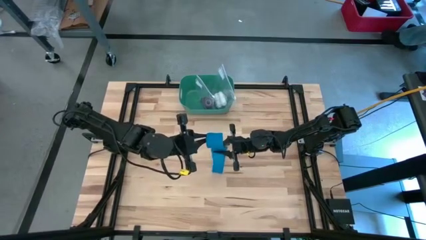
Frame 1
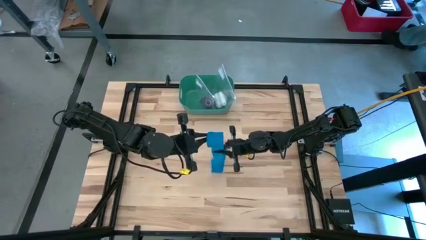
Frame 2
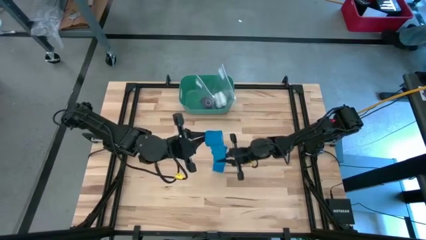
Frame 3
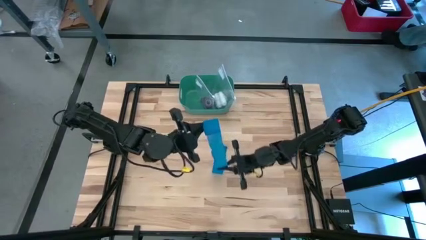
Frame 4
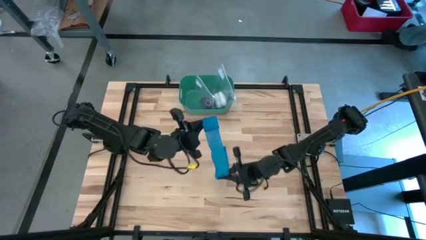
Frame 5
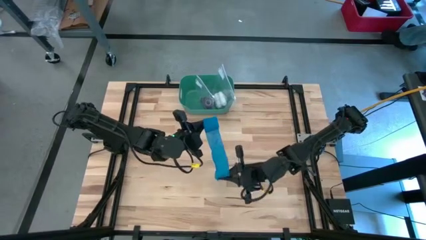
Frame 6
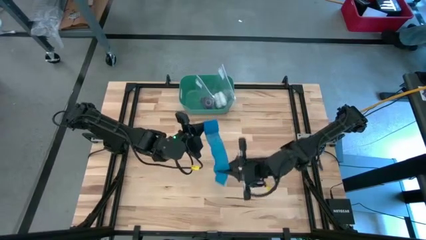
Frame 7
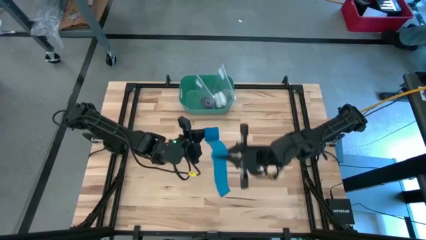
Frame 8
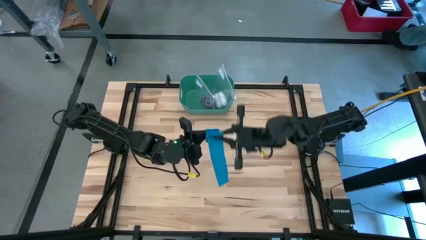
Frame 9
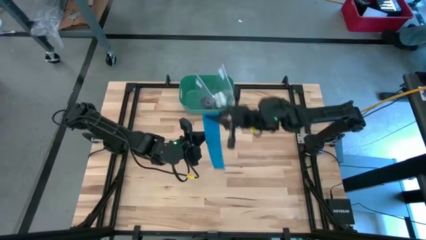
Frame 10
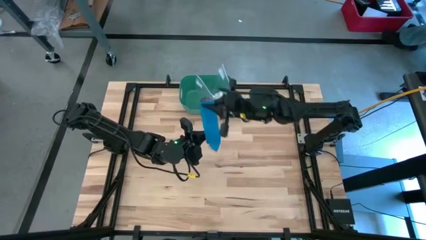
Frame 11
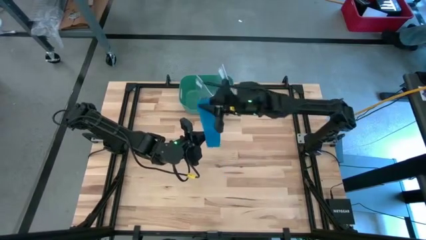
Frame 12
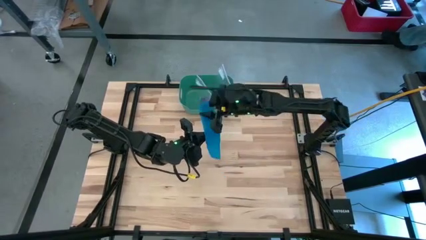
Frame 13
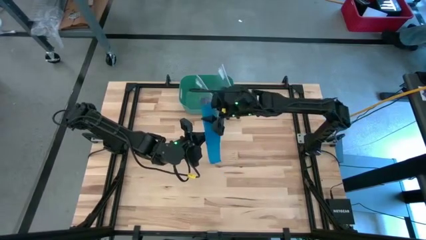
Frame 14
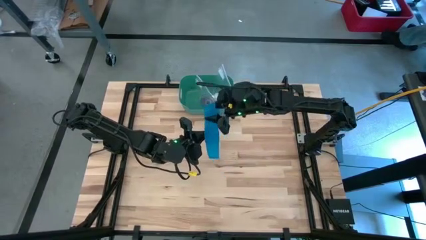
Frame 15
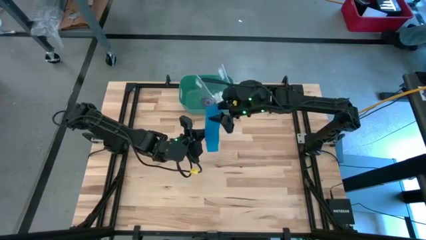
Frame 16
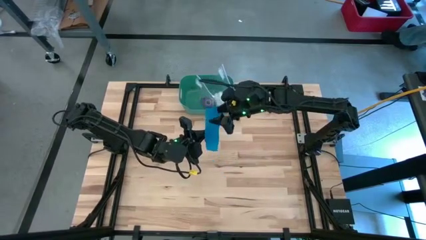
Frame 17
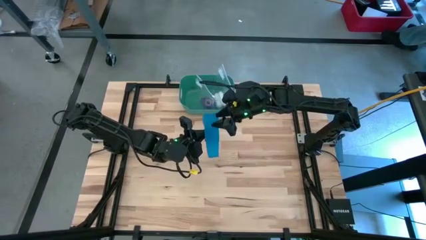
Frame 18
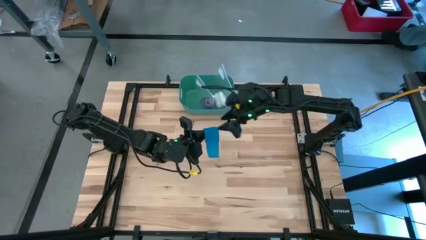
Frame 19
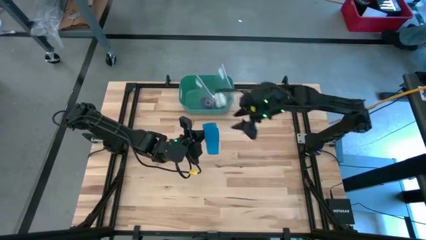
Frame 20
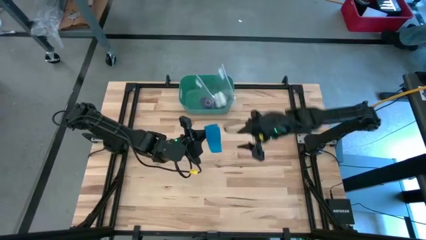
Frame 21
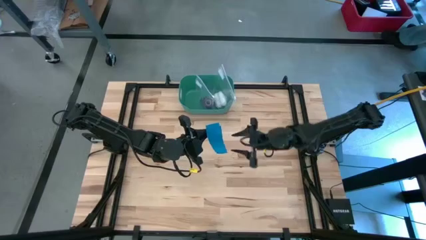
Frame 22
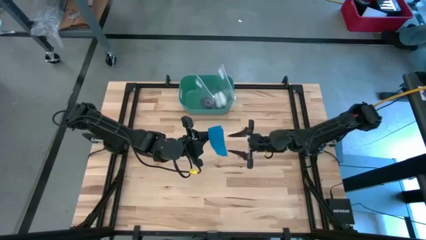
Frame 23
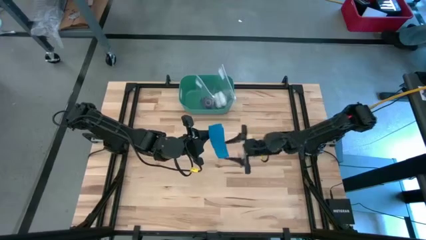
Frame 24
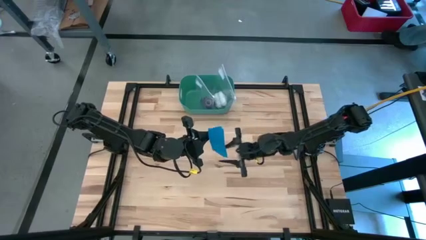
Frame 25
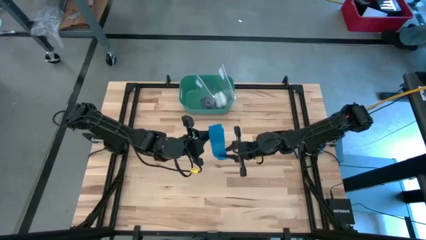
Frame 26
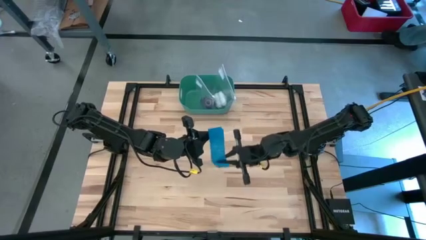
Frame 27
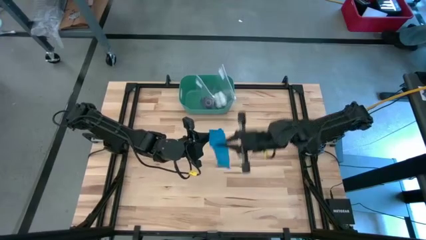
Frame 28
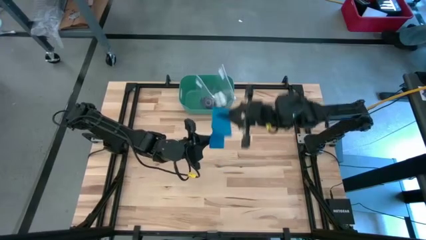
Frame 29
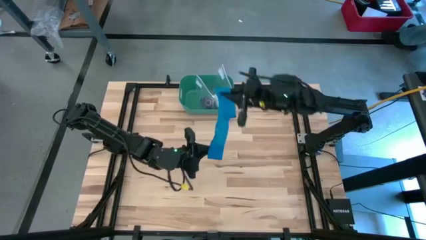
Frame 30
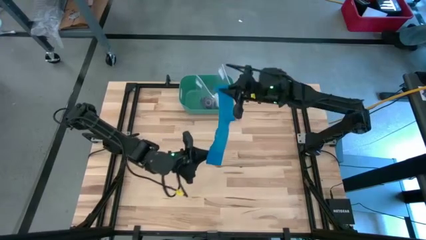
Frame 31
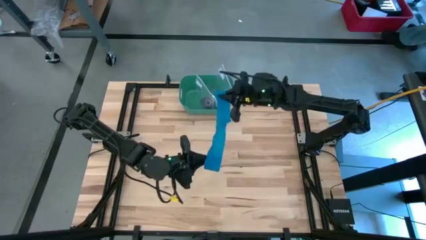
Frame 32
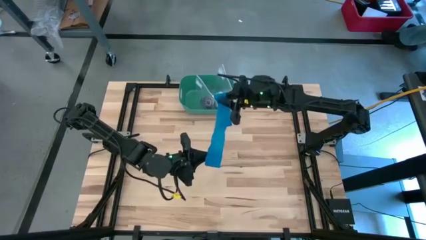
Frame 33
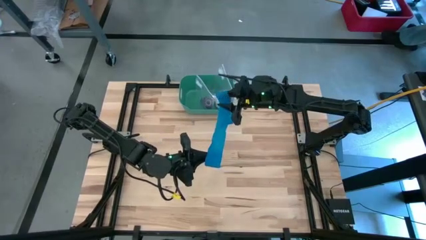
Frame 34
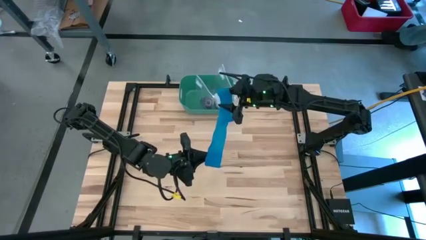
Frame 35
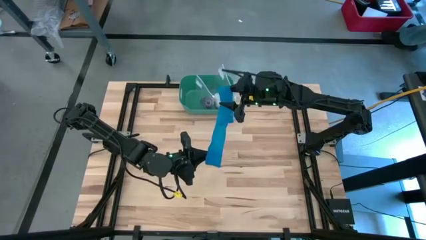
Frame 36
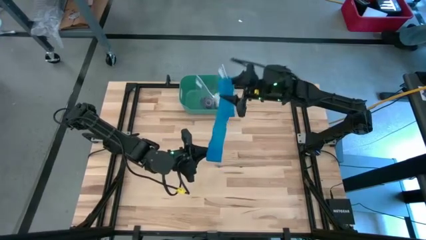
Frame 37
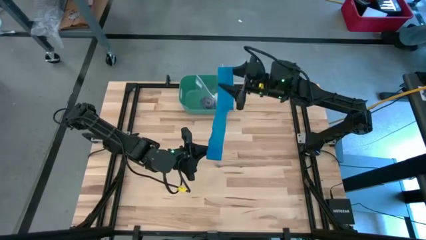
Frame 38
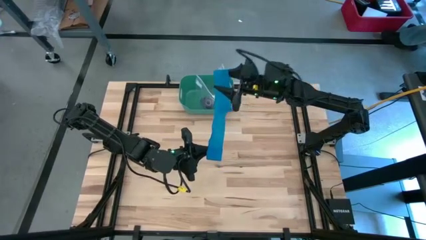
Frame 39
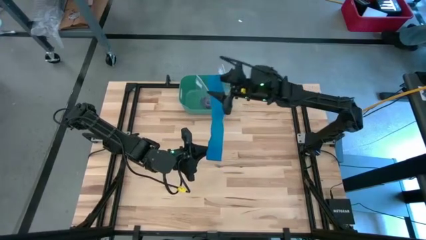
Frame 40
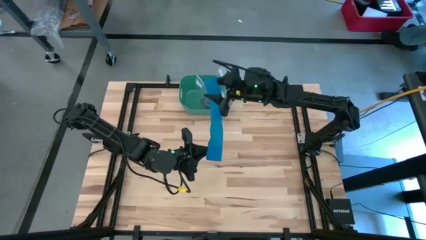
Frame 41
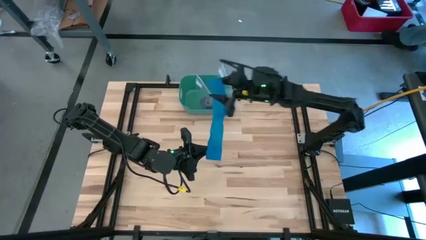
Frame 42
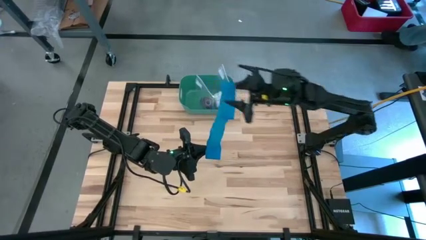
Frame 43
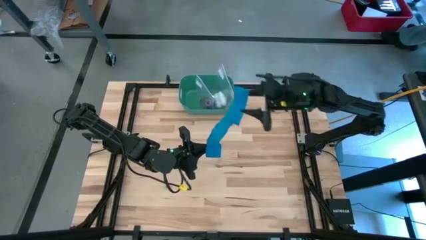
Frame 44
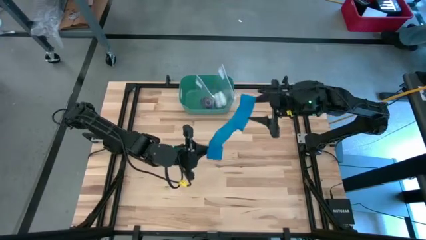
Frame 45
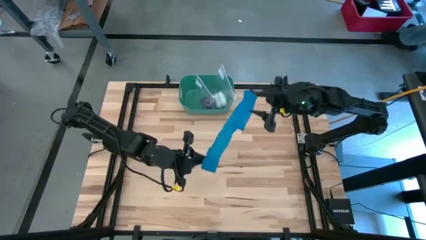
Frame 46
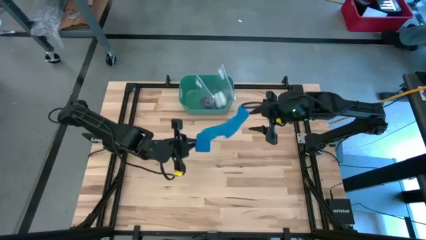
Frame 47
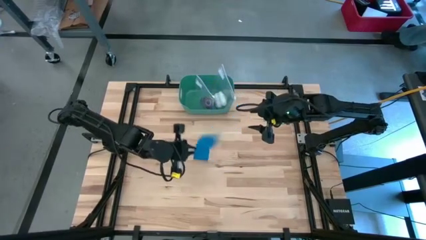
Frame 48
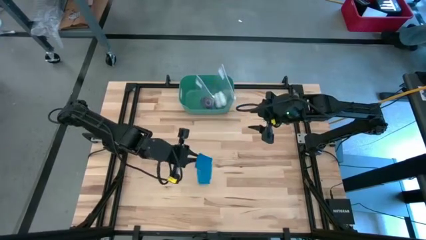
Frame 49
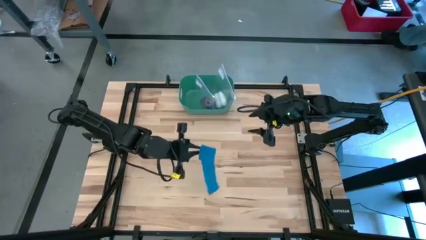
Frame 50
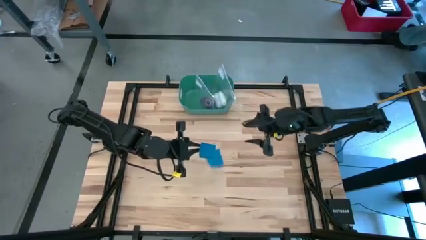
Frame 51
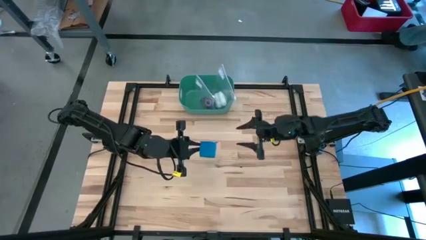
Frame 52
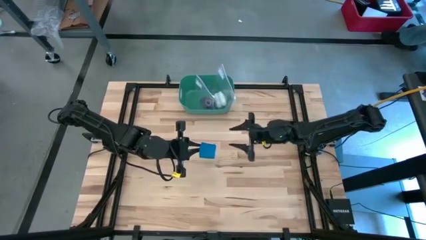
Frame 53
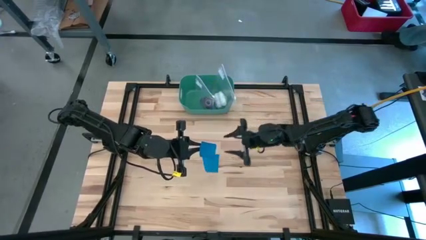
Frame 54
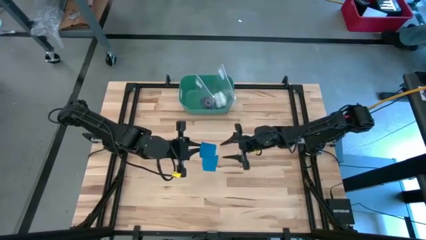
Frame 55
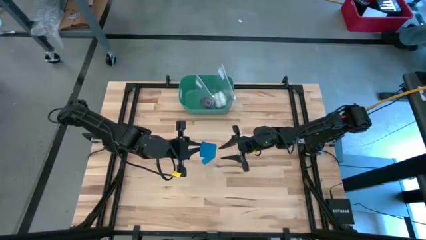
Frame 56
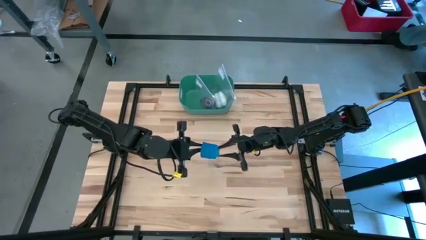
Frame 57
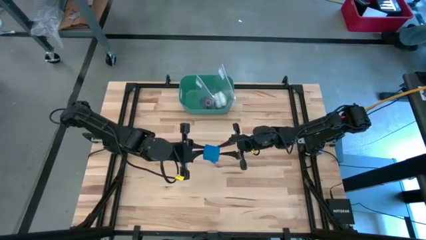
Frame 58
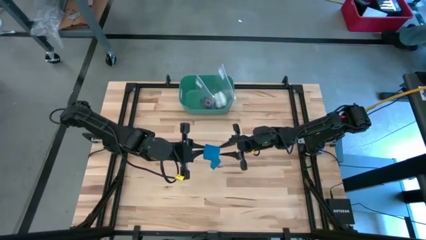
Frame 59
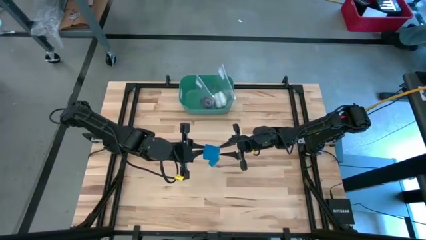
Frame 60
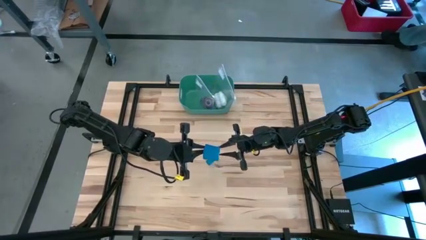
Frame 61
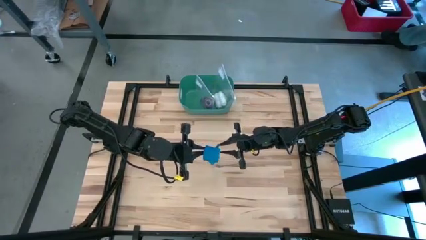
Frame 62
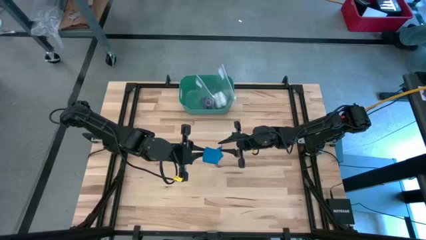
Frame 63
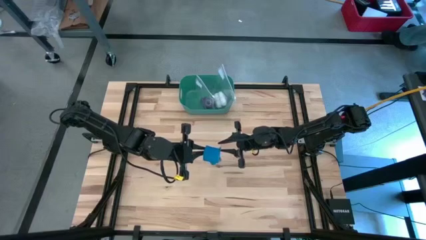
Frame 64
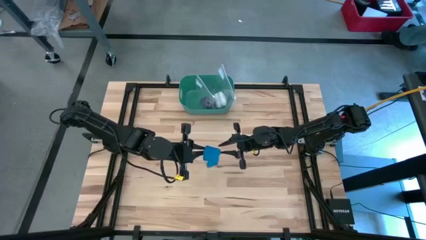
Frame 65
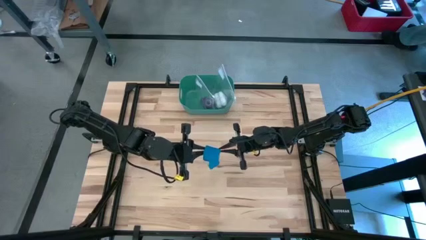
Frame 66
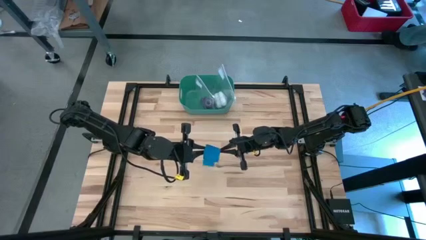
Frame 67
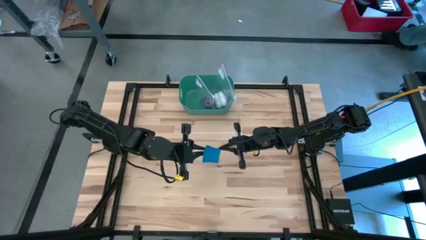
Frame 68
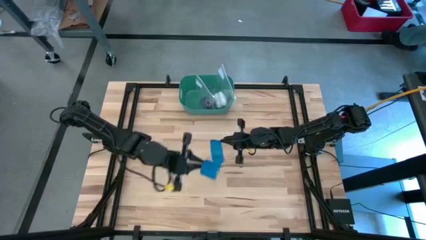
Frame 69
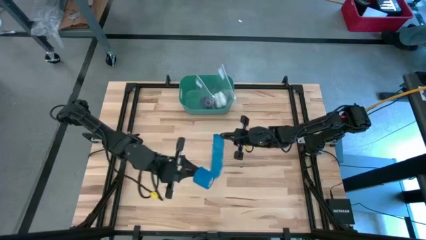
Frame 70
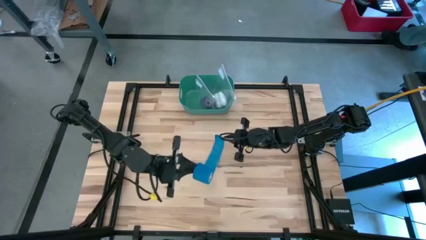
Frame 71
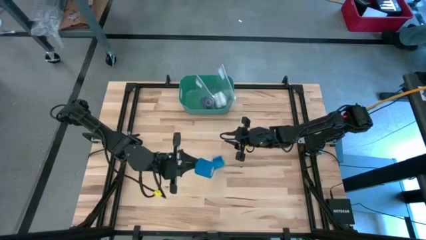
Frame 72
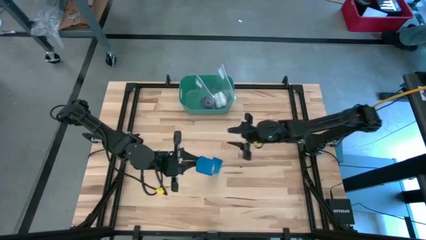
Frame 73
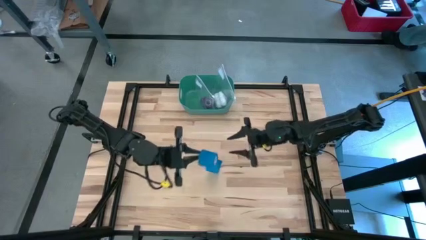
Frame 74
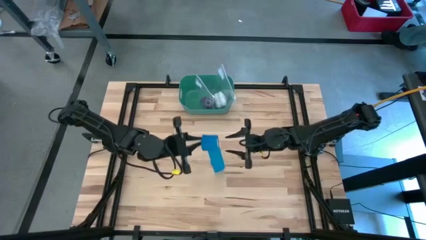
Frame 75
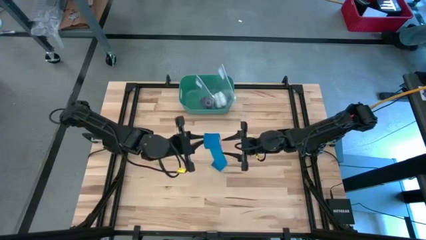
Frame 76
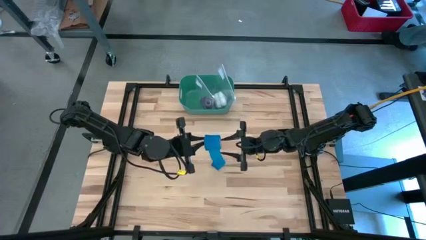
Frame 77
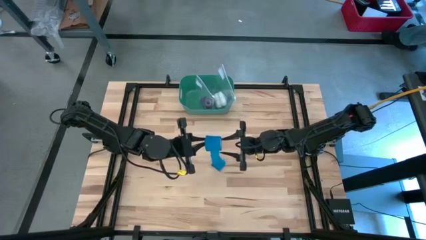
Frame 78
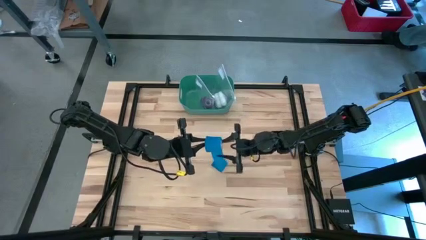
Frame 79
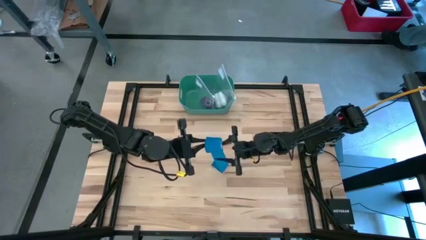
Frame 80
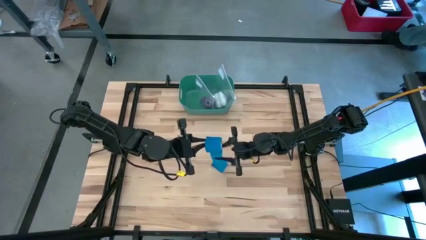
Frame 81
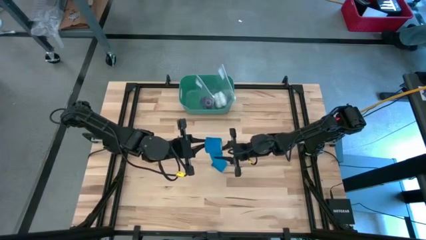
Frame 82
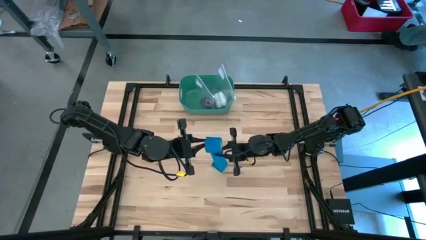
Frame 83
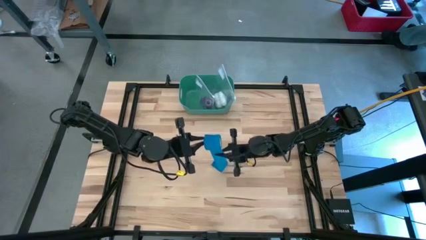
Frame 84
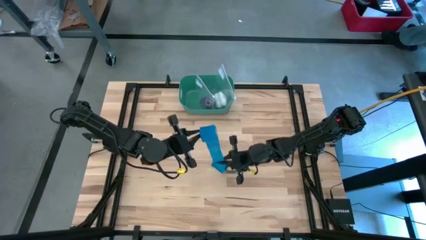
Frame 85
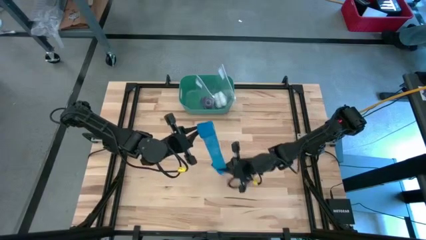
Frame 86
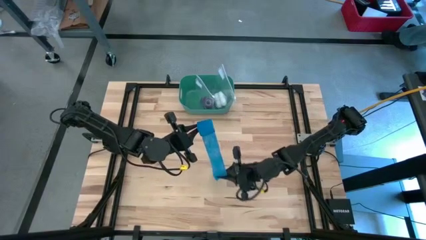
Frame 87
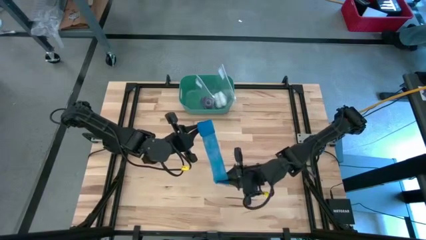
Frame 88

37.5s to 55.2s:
Task: Roll bandage
Roll the blue bandage
